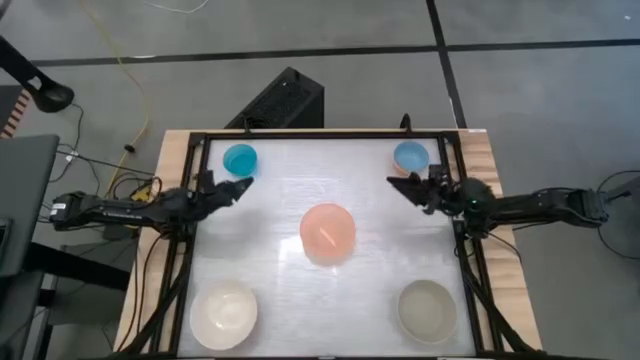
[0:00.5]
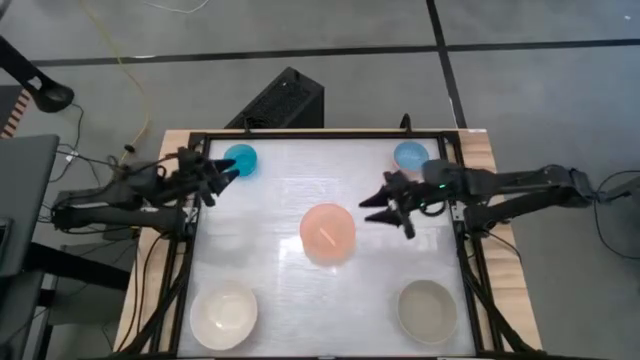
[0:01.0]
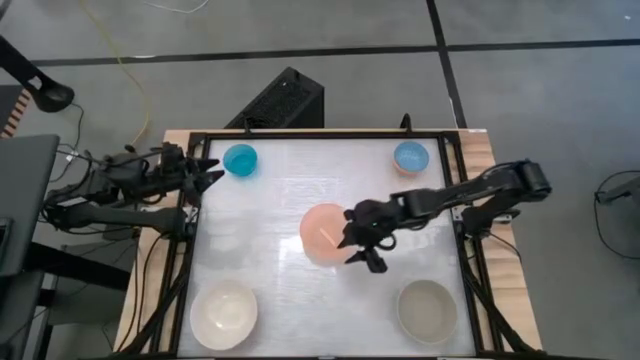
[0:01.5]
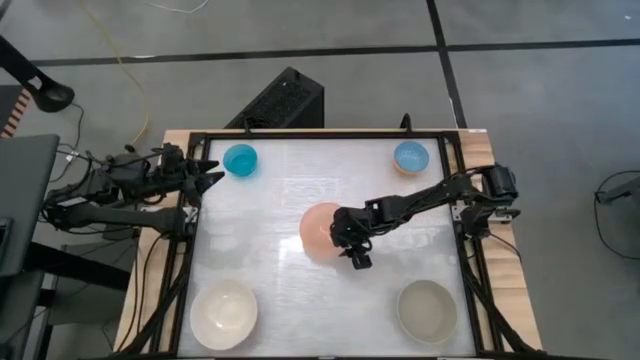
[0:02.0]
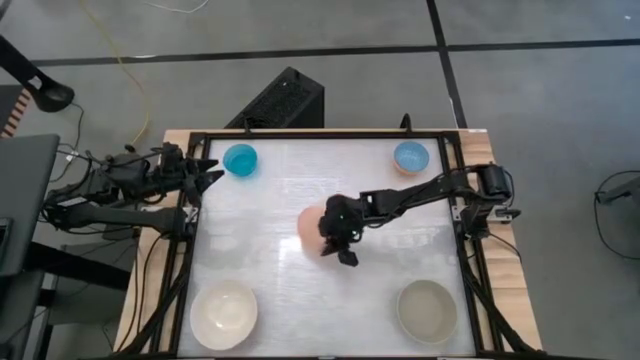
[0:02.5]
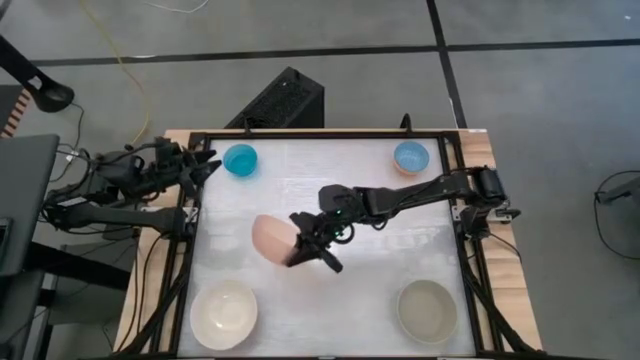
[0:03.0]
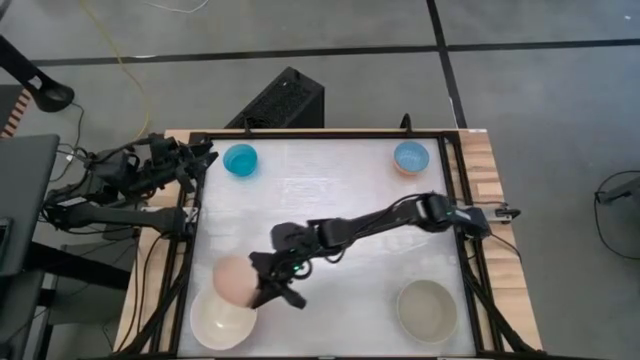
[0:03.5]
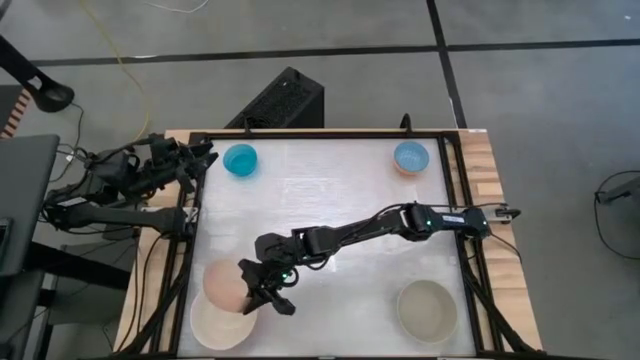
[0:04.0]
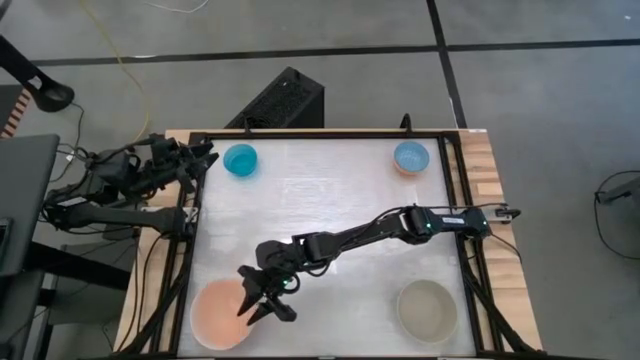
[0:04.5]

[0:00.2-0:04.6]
Stack the orange bowl on top of the white bowl

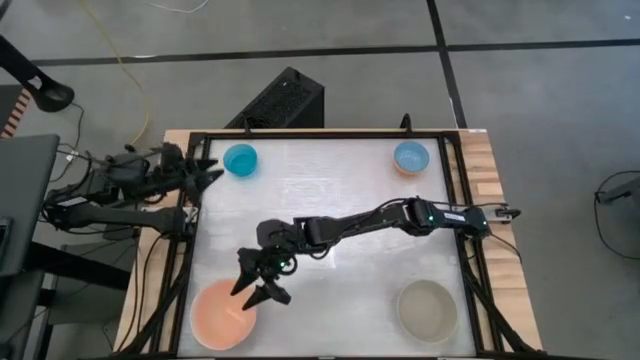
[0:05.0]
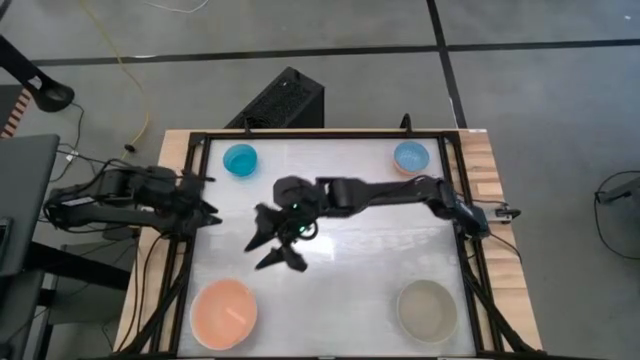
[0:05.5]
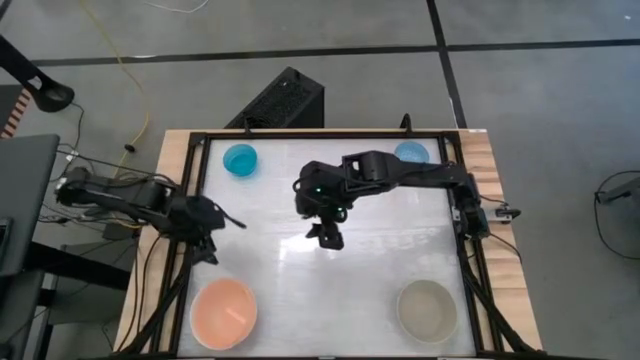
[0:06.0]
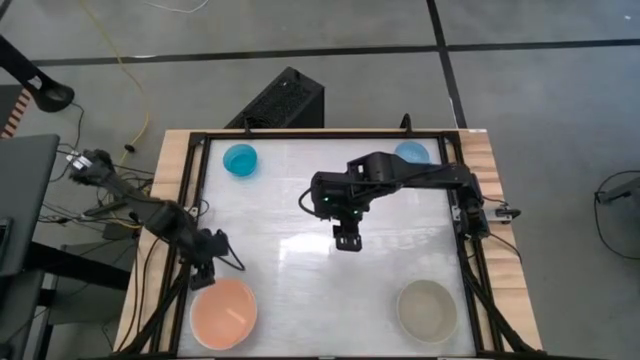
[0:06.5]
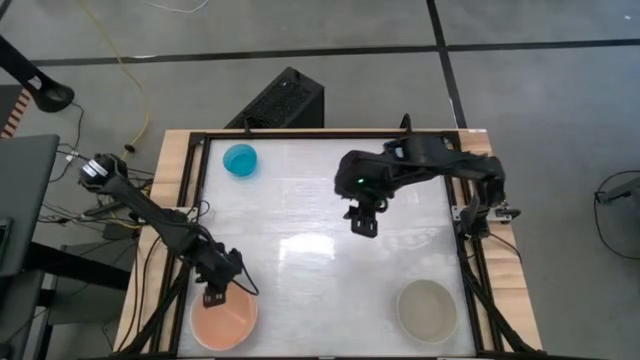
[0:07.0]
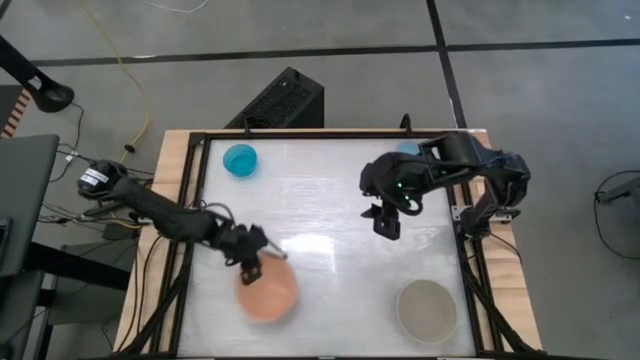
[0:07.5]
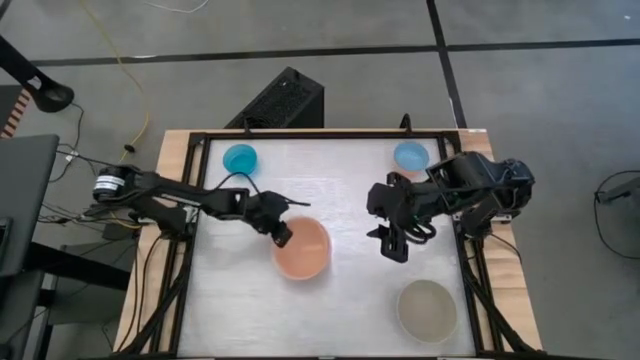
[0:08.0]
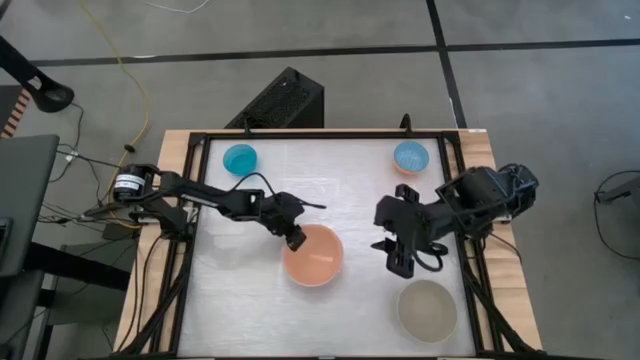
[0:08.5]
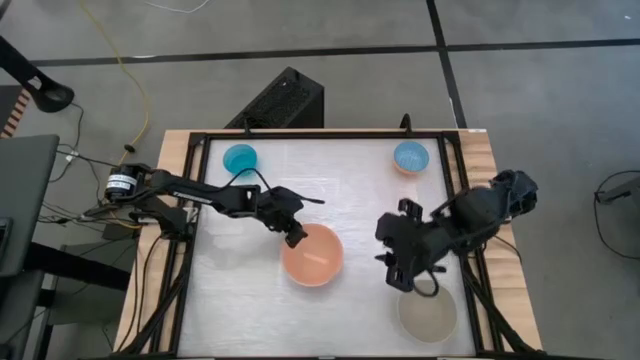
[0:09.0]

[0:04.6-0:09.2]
Move the stacked bowls to the center of the table

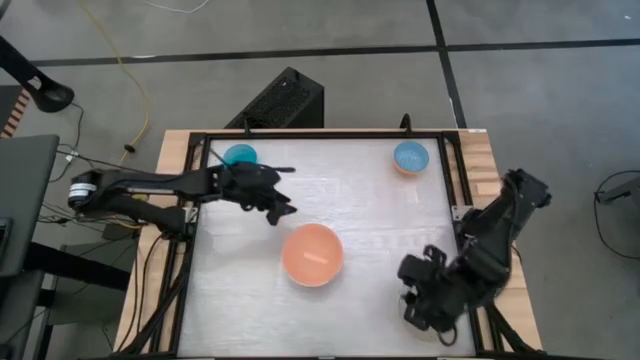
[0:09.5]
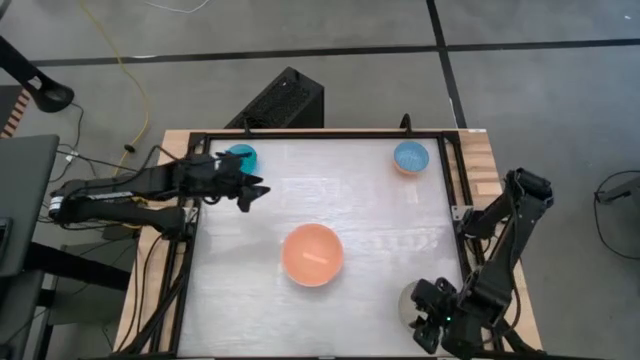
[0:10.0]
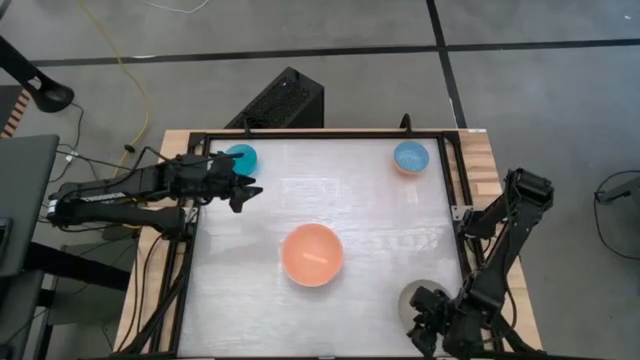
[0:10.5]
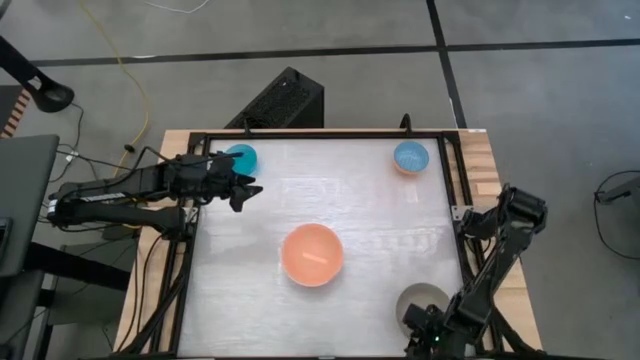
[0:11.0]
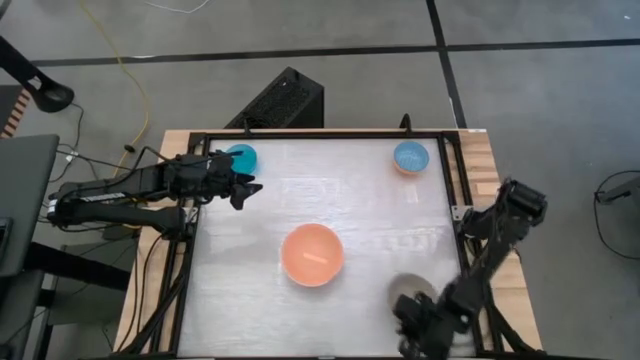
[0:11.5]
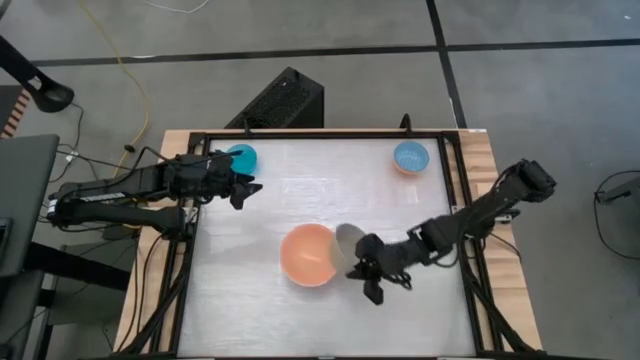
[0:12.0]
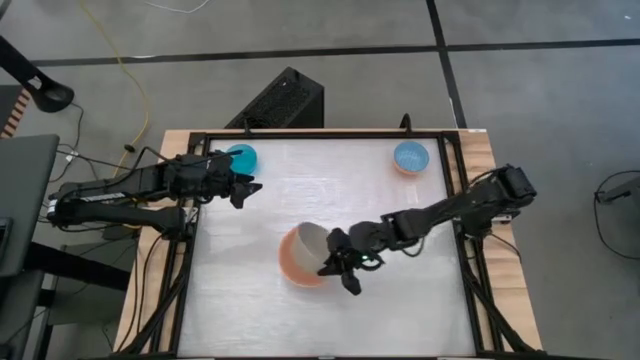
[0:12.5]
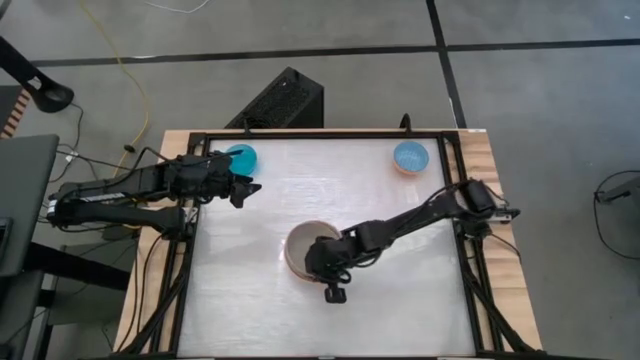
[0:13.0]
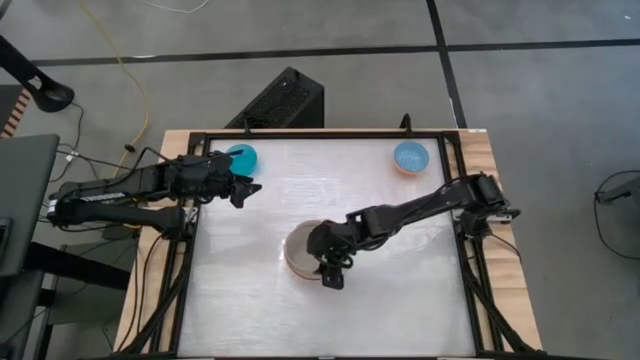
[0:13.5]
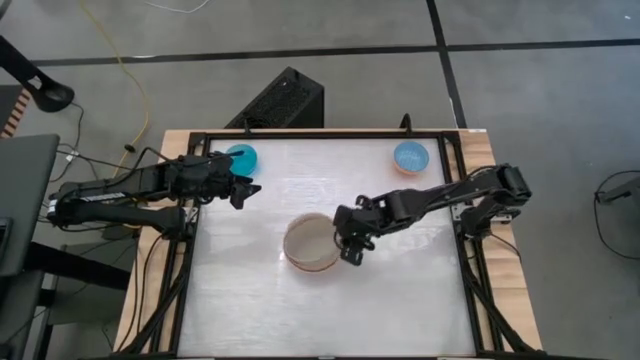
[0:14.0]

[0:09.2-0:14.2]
Stack the gray bowl on top of the orange bowl

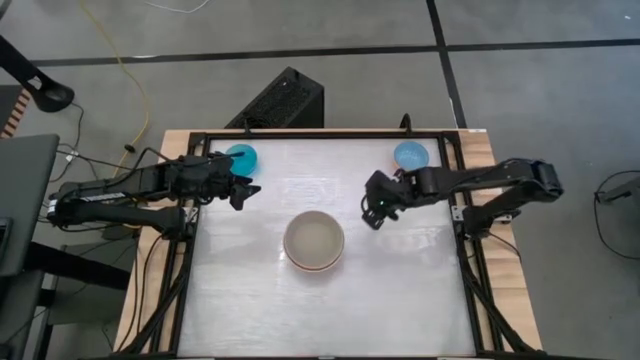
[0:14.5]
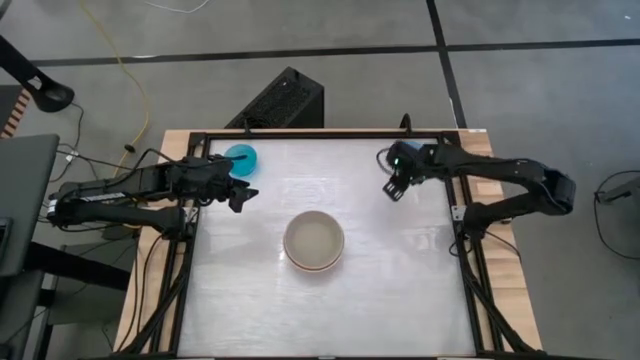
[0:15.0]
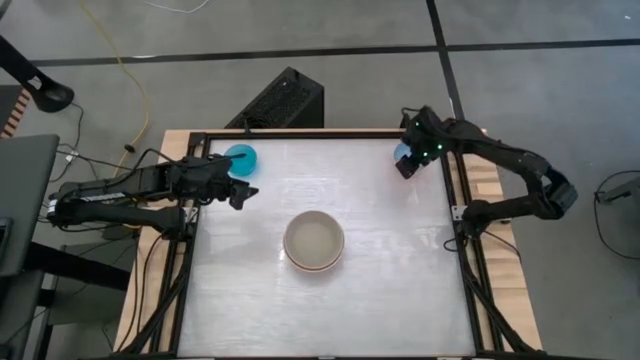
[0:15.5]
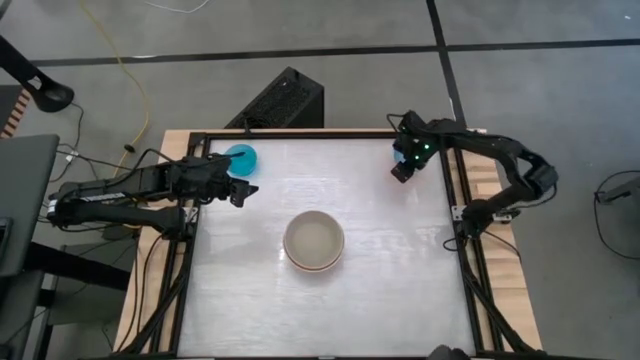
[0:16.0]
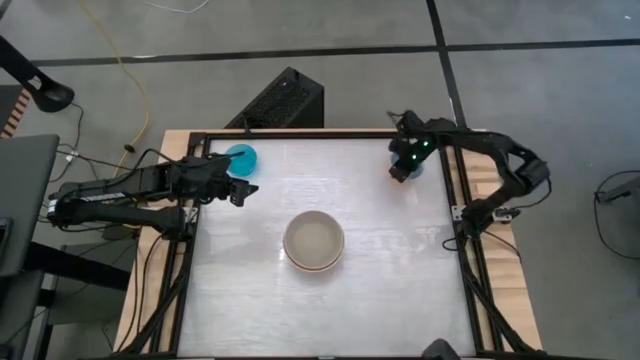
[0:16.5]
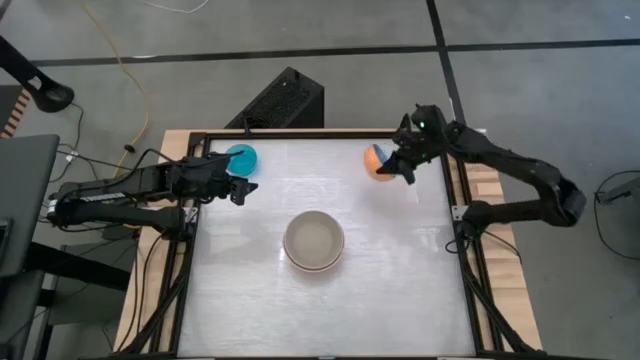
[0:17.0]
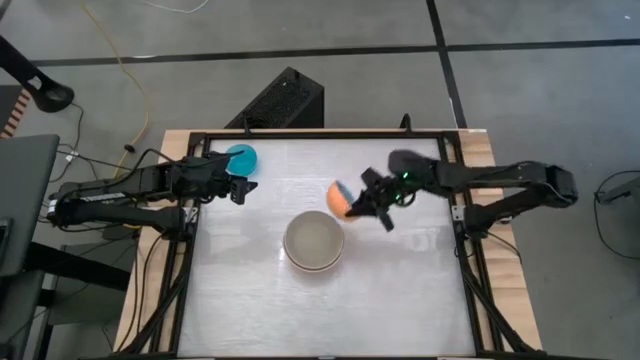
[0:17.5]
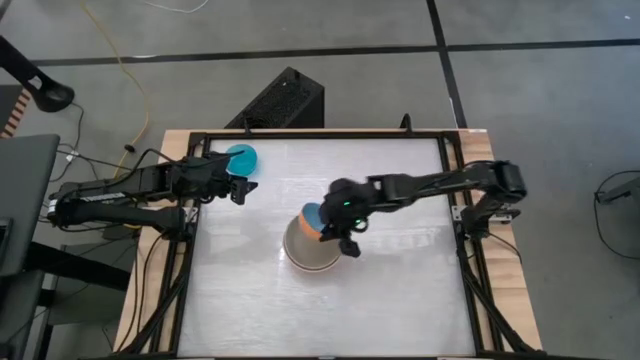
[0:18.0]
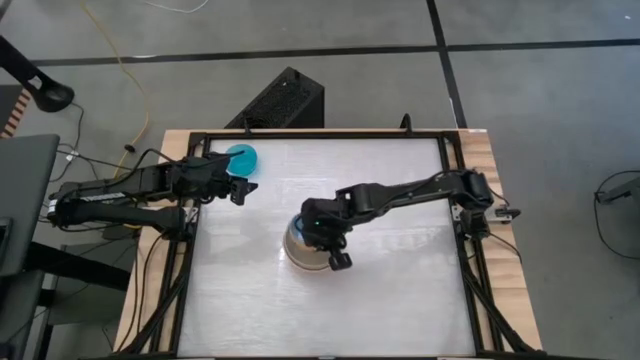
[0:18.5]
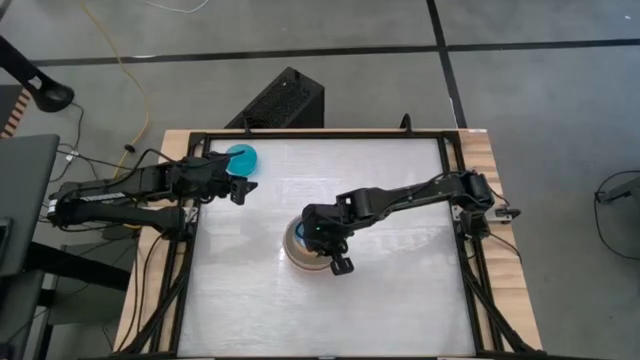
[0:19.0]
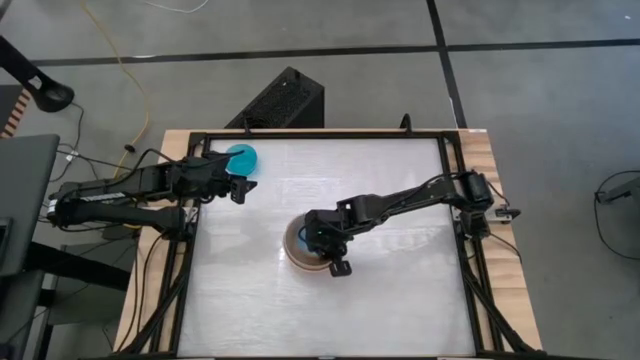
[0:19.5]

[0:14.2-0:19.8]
Stack the blue patterned bowl on top of the gray bowl
